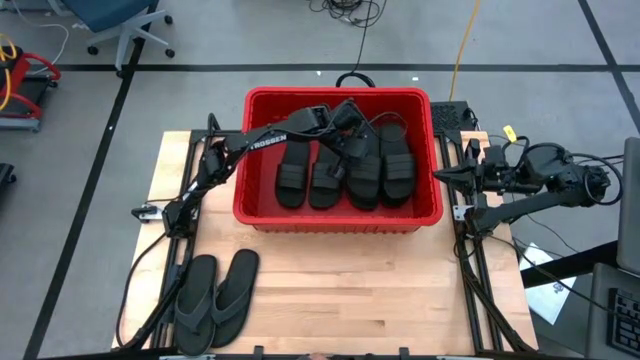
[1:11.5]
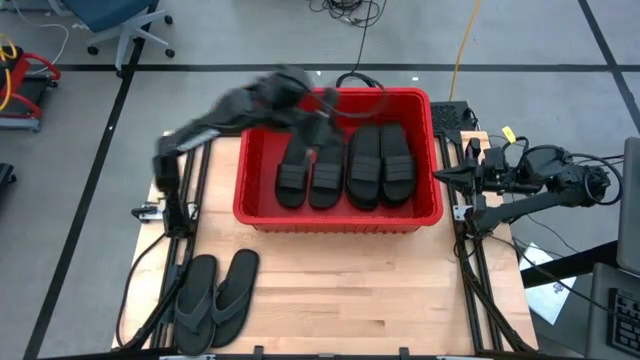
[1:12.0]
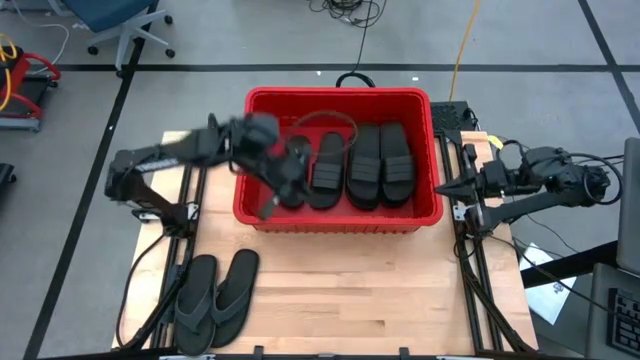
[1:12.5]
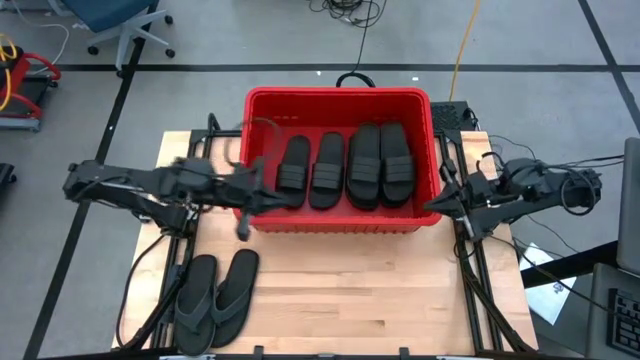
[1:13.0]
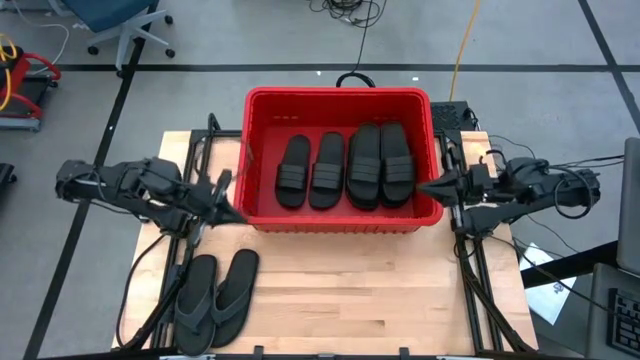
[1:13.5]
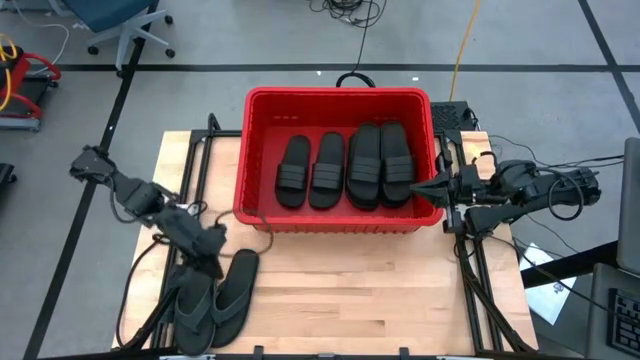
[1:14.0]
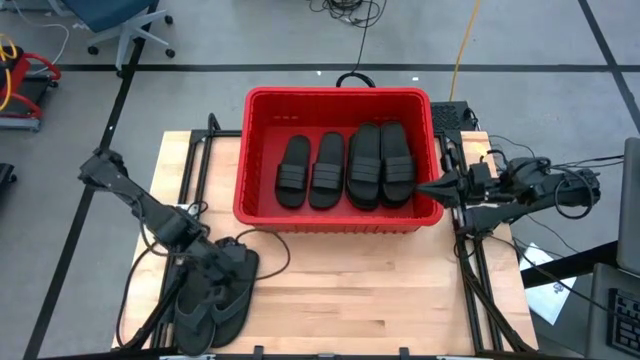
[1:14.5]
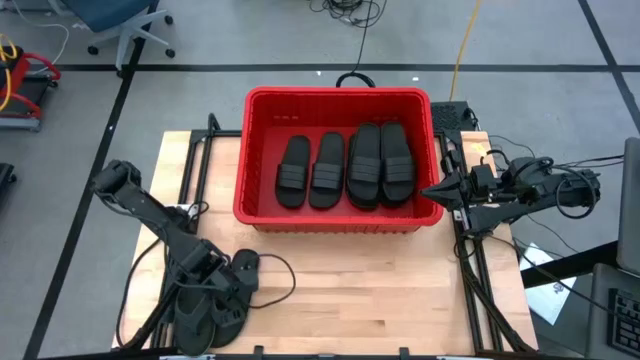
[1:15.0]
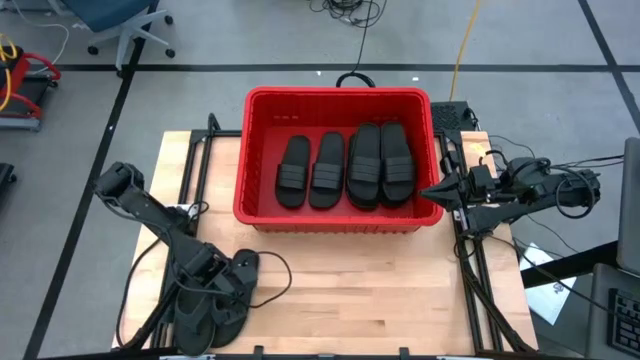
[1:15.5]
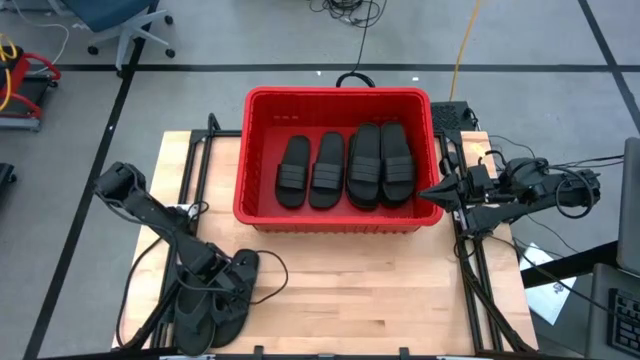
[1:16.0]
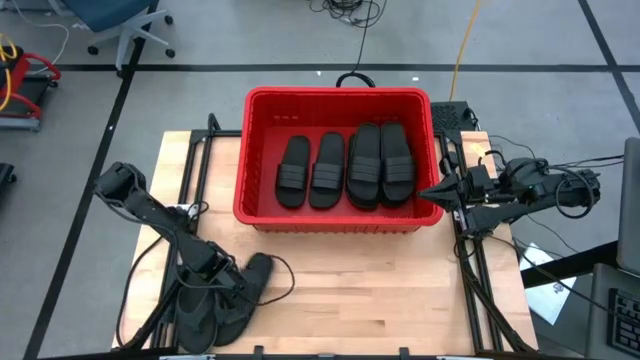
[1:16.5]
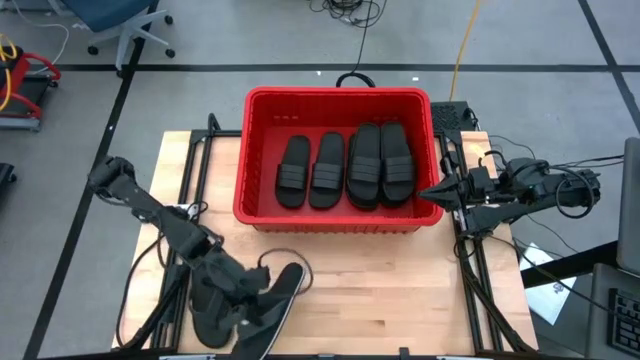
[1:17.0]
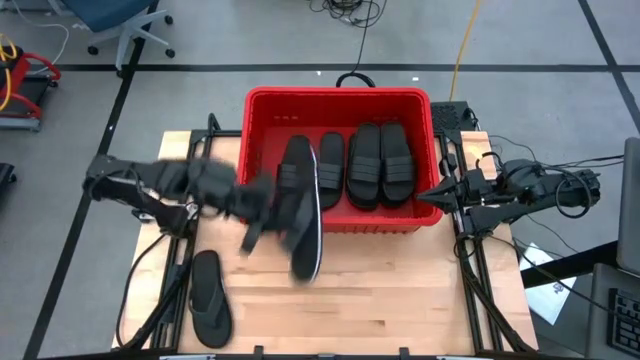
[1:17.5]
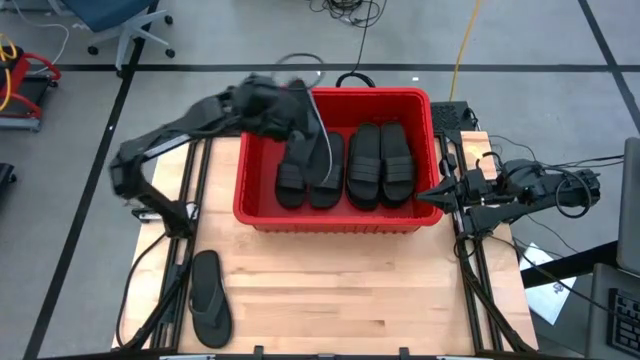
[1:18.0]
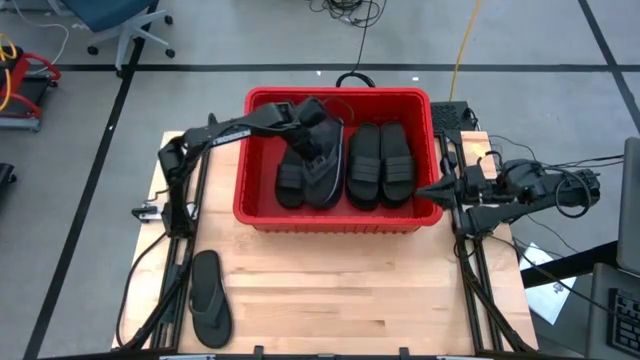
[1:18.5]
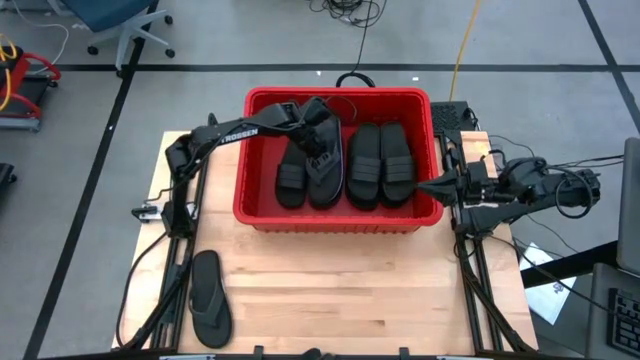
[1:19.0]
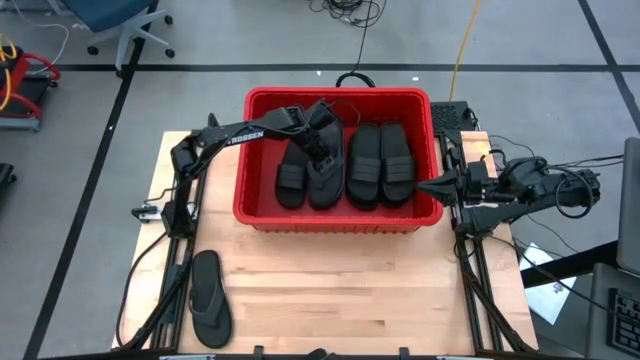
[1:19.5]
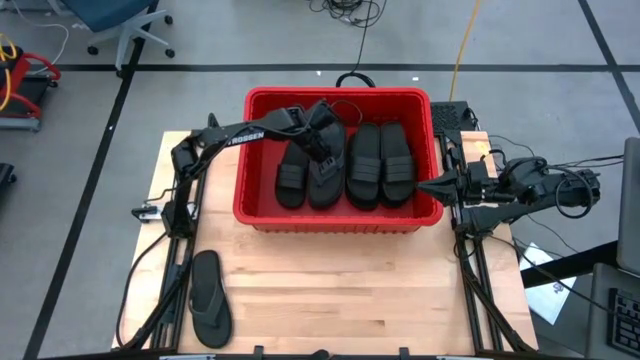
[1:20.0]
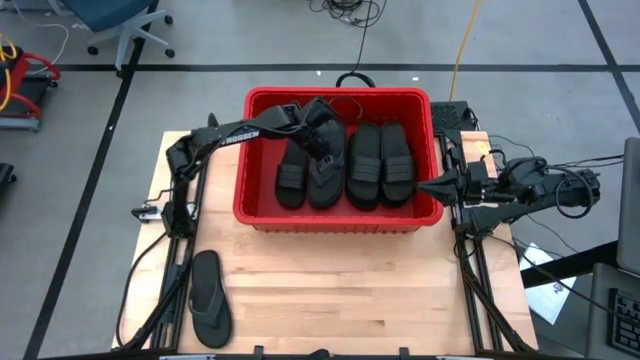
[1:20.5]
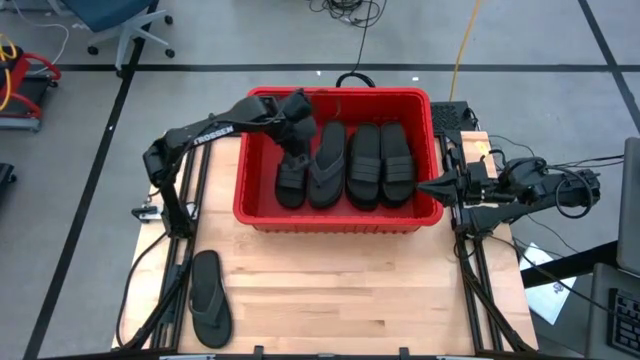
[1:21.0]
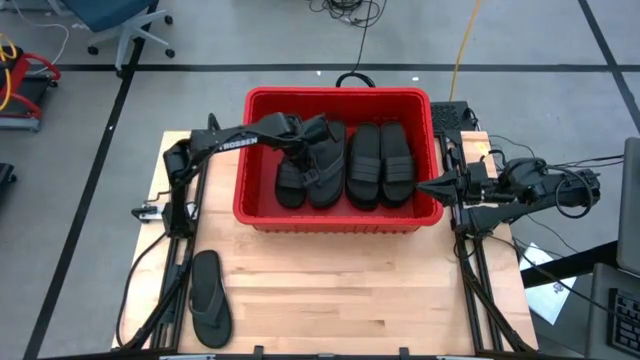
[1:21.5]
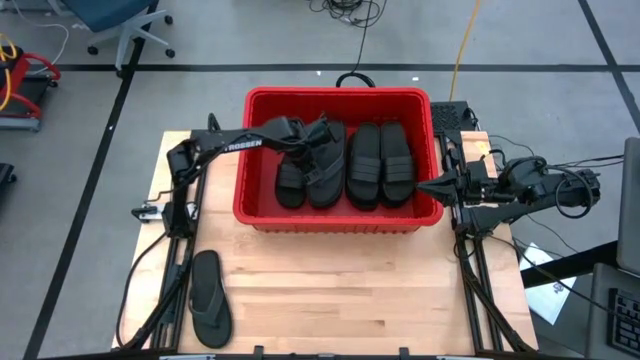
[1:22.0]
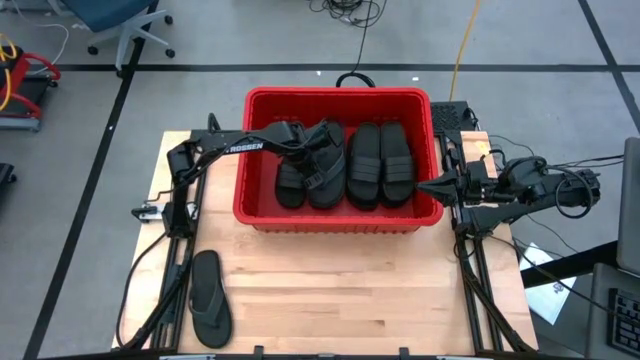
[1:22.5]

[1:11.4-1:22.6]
Task: Pick and place slides into bin
Put the black slipper into the red bin

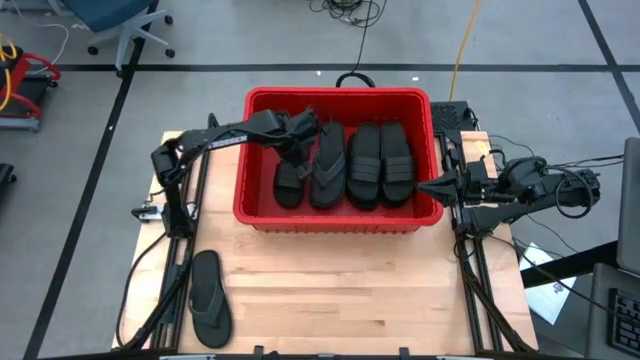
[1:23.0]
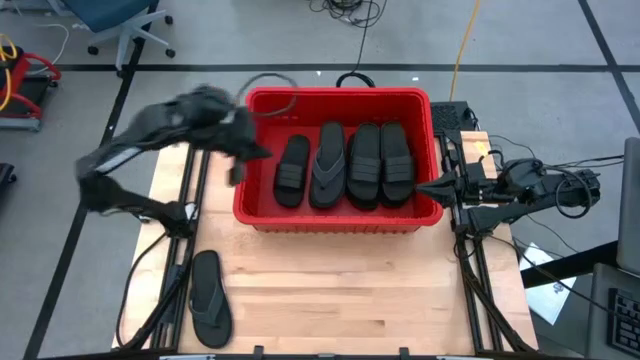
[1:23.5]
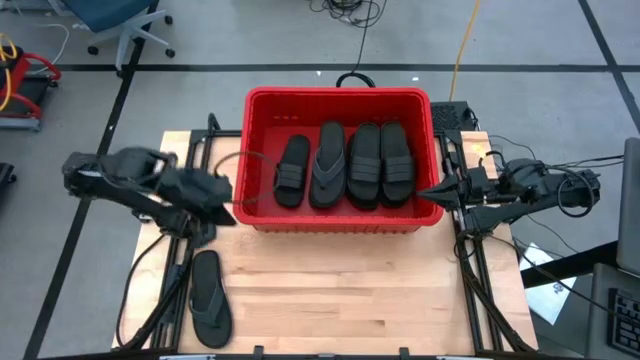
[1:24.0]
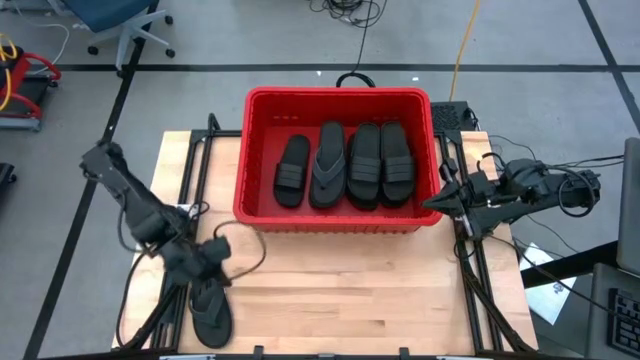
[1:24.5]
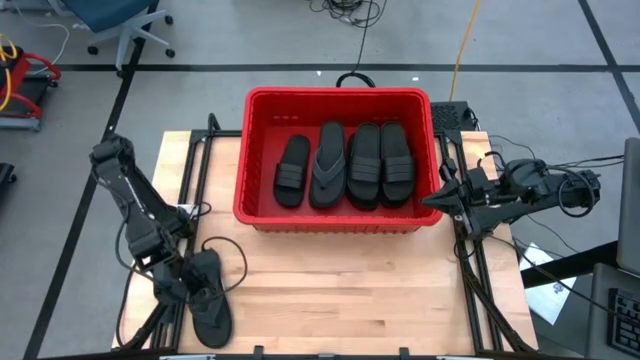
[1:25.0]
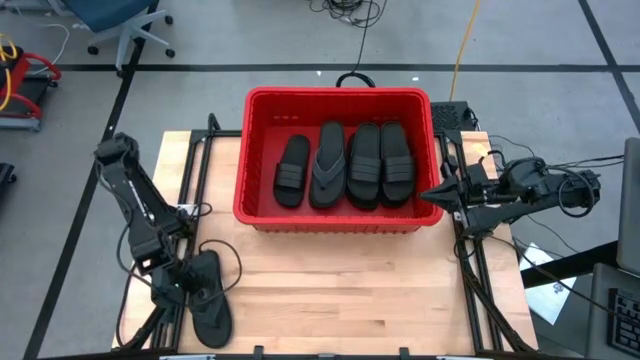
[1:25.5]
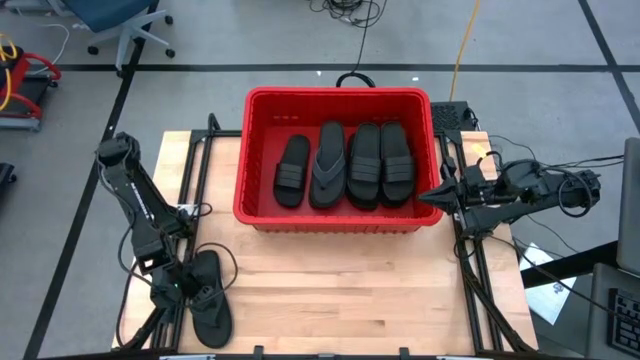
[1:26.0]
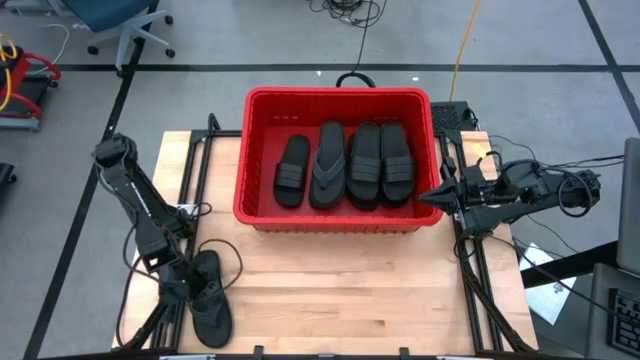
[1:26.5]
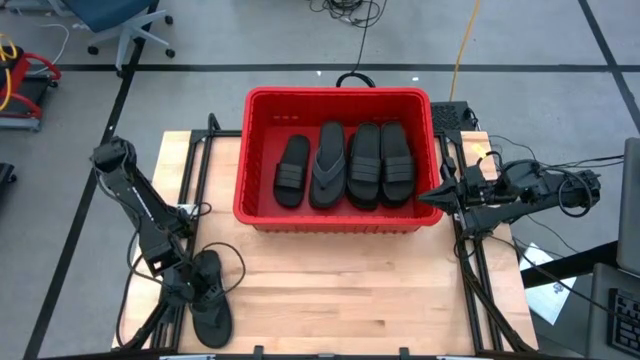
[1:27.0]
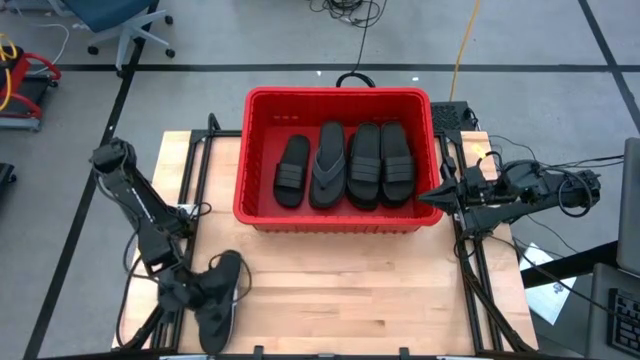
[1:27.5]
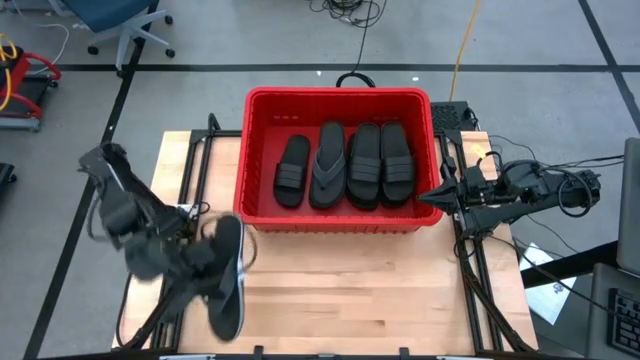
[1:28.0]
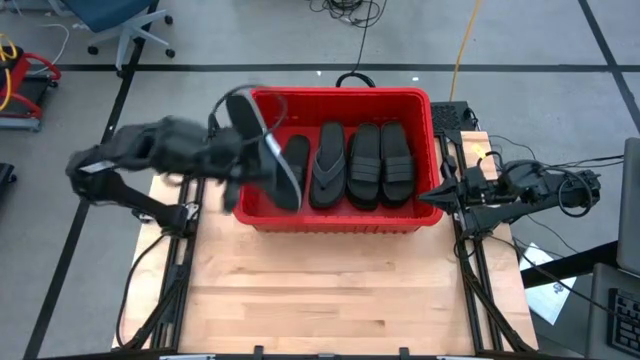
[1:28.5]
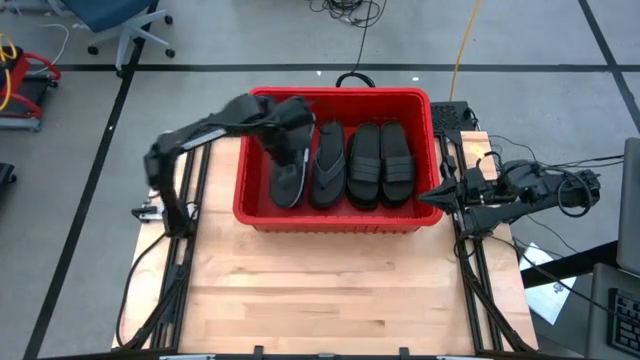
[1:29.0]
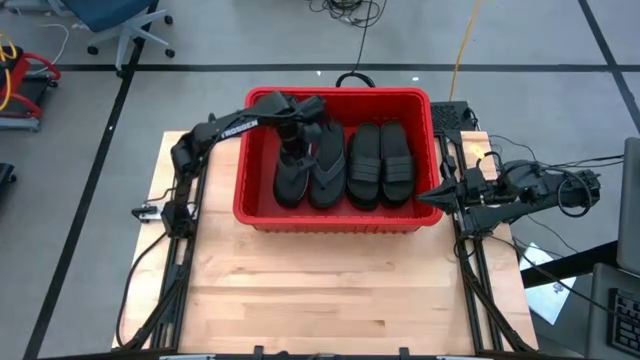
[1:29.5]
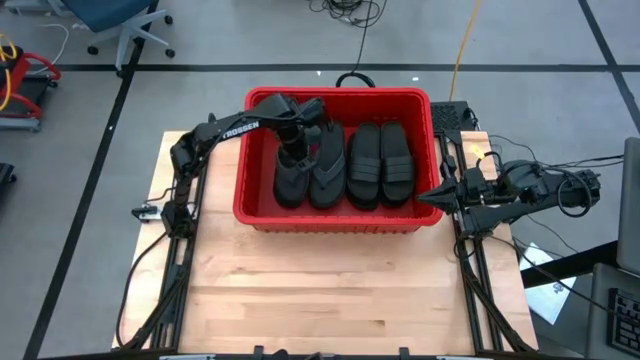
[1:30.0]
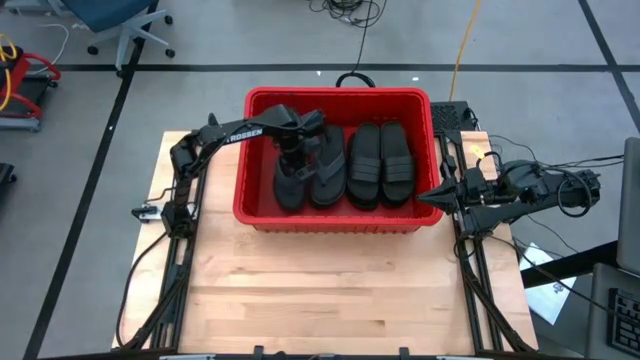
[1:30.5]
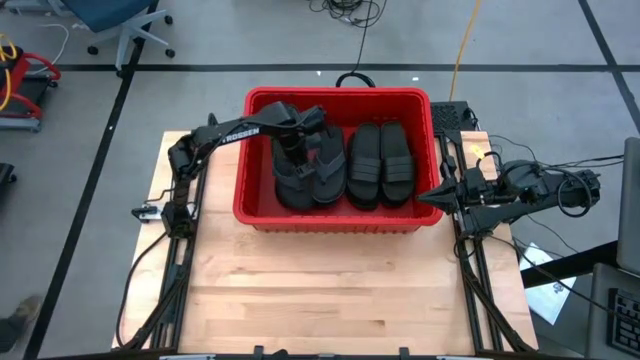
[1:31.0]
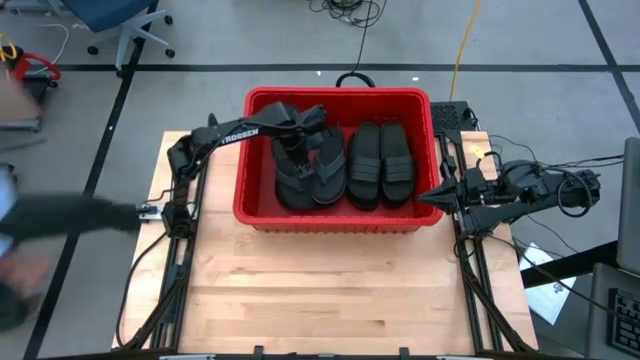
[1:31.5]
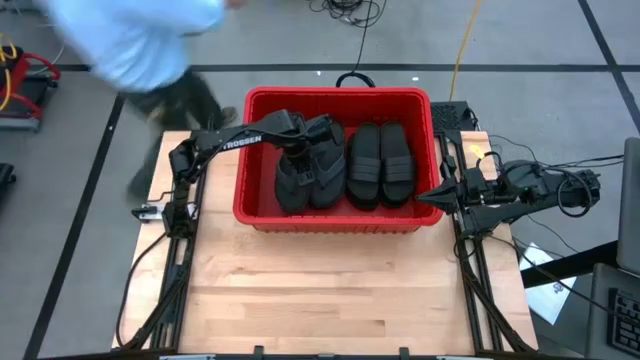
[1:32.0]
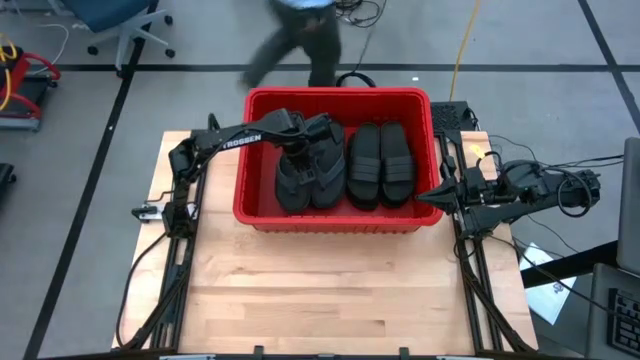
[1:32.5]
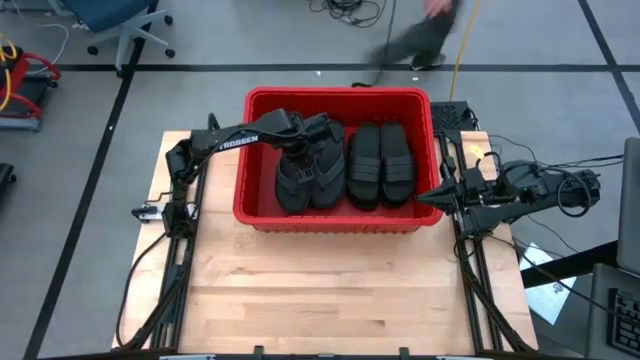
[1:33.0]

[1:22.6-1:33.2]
Put the black slipper into the red bin
